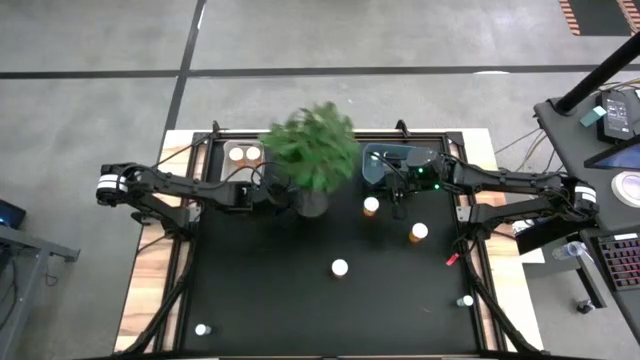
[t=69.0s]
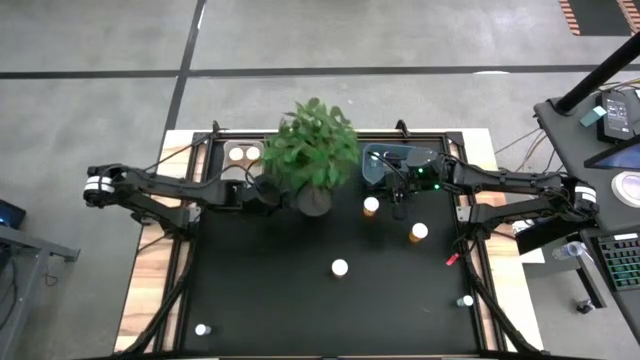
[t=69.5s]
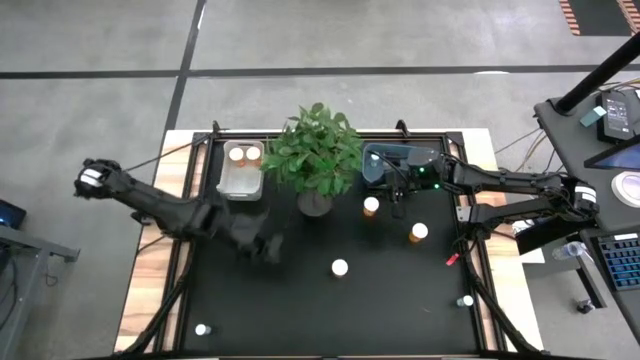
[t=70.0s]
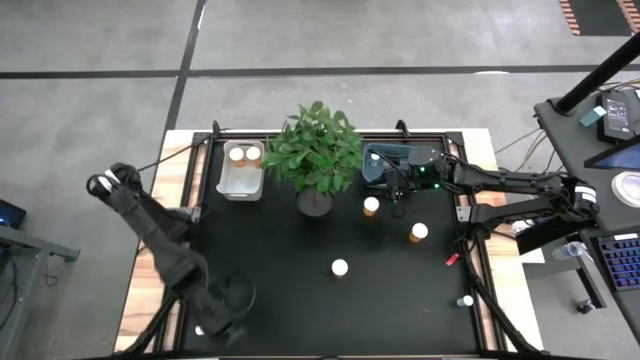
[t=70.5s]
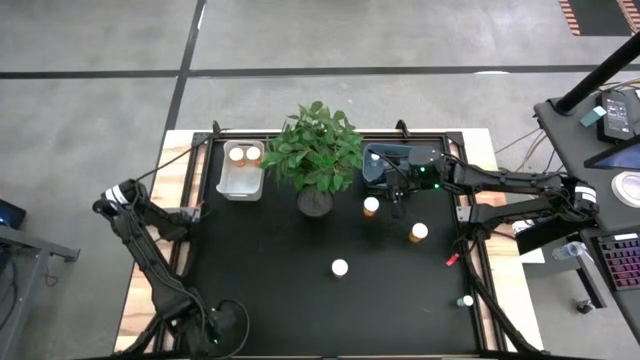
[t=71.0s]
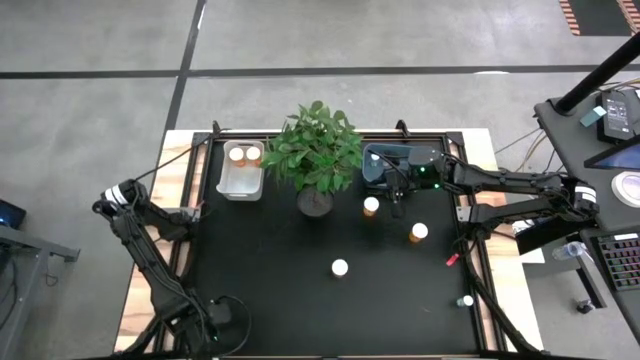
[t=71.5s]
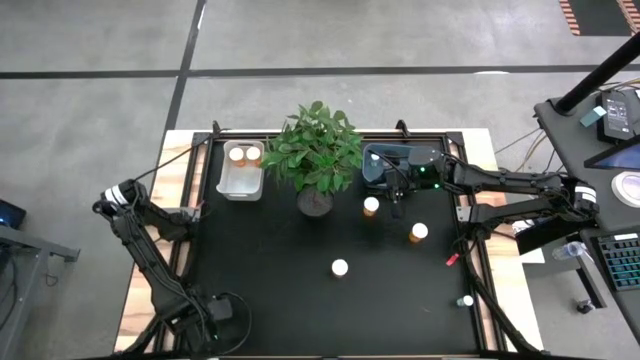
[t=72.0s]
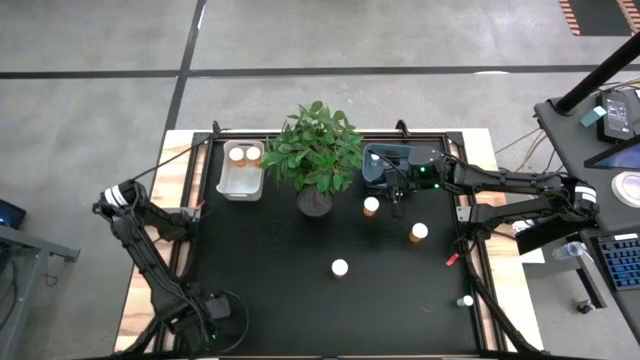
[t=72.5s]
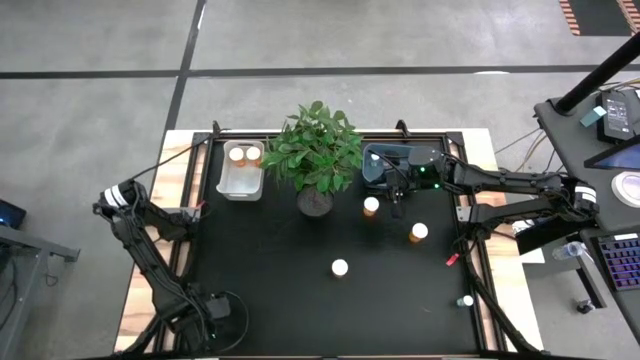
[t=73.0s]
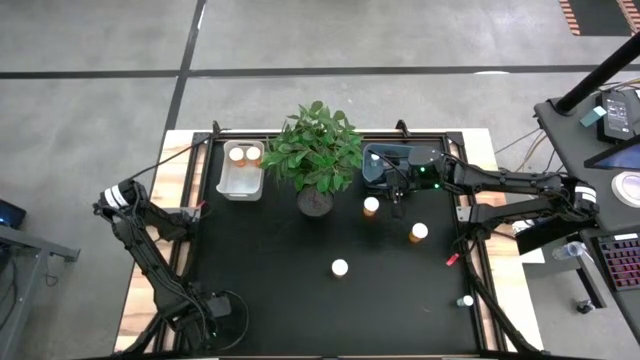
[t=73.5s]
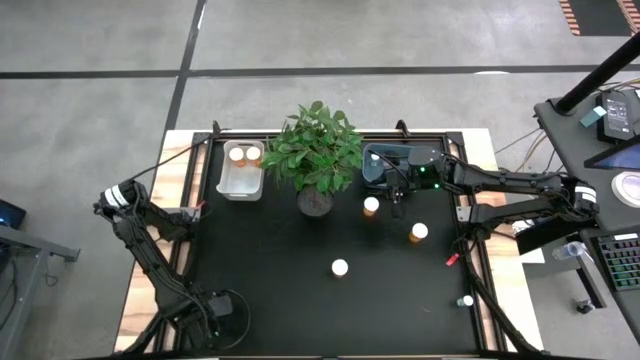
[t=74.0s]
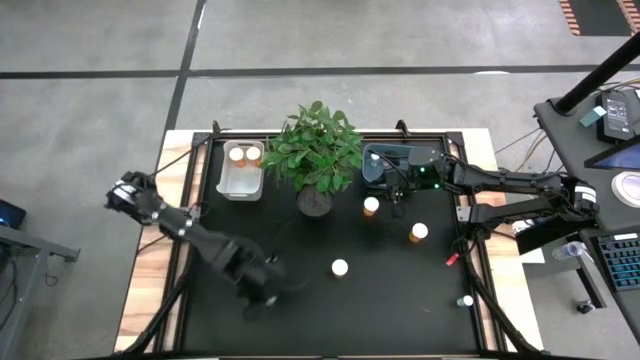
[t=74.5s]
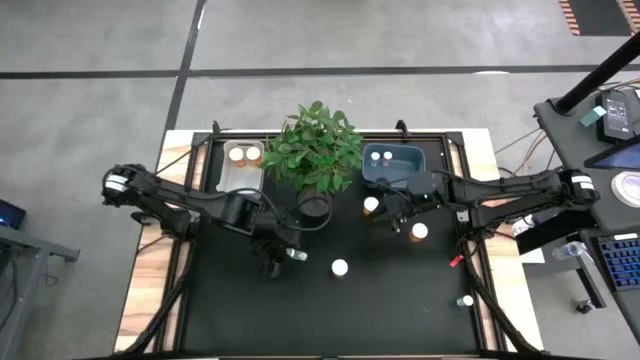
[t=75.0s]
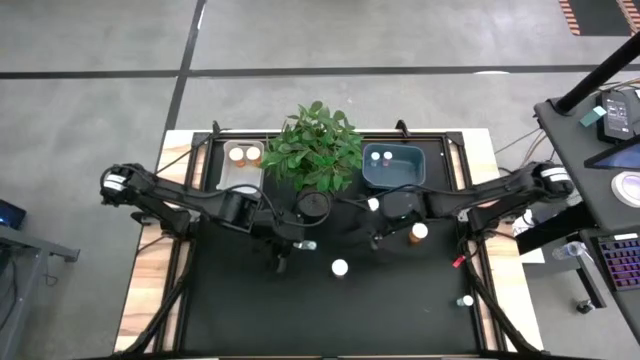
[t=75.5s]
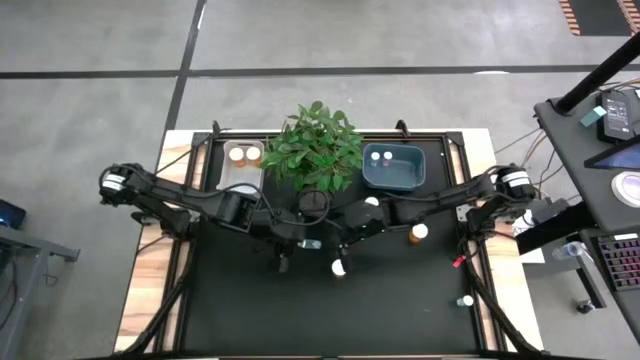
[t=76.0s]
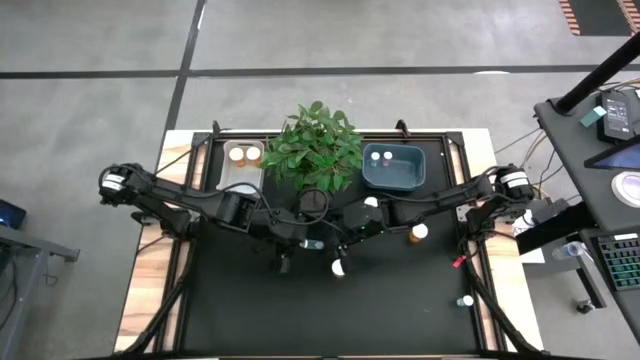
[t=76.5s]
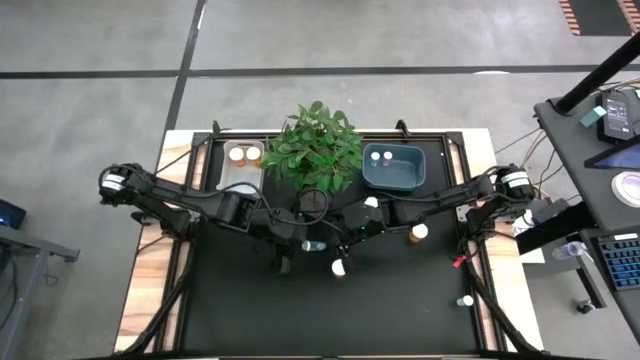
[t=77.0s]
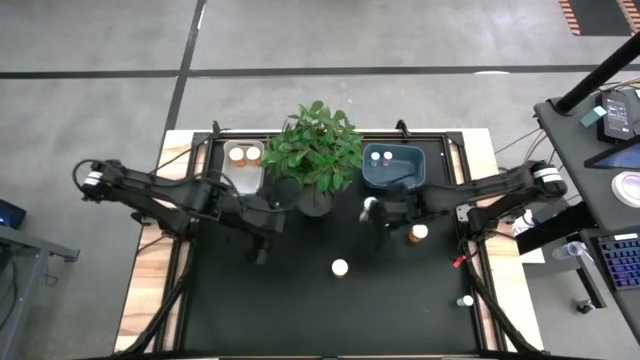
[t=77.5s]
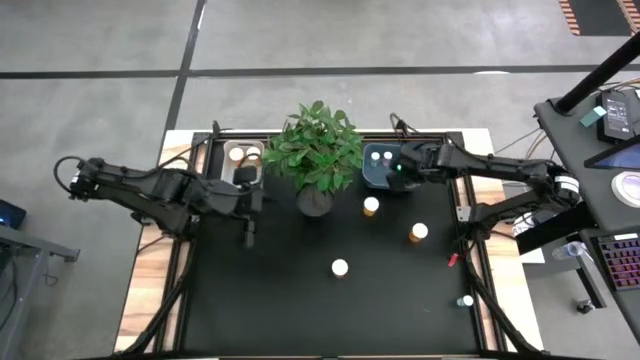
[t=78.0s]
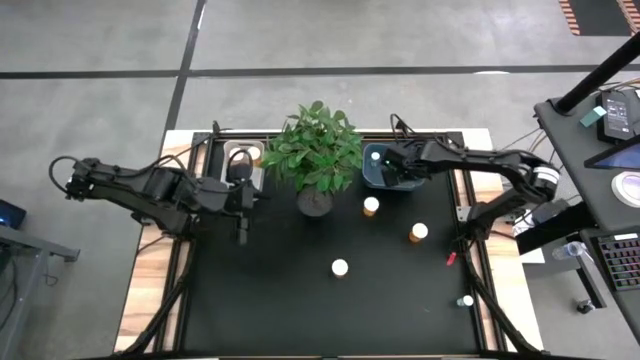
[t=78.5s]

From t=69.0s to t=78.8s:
Task: Pick and place medicine bottles into bin by pill shape (circle, oval)
Put the small blue pill bottle into the blue bin

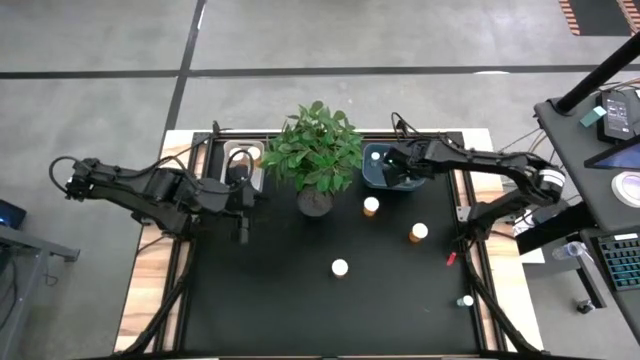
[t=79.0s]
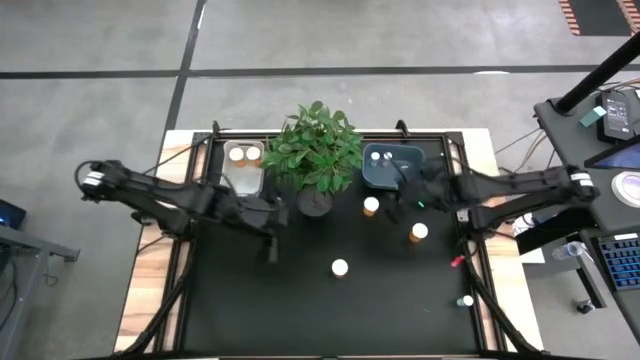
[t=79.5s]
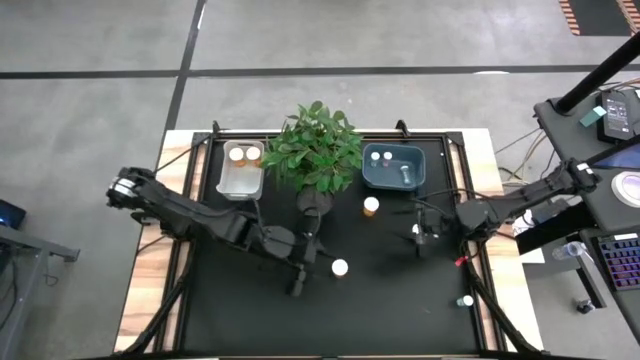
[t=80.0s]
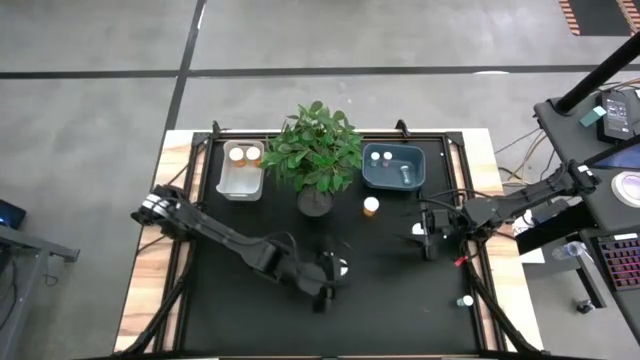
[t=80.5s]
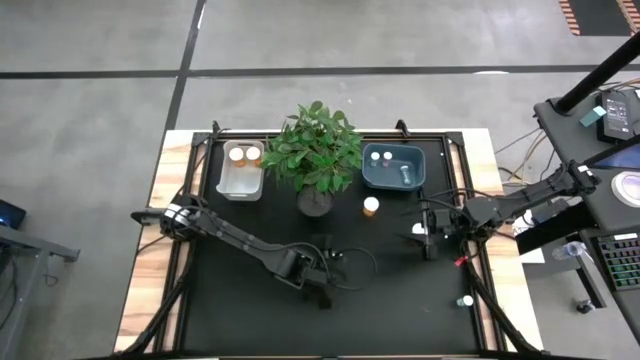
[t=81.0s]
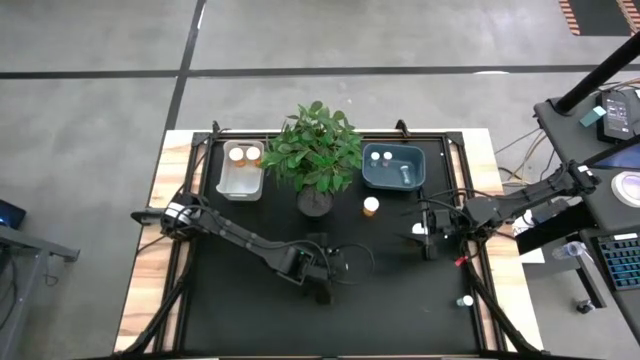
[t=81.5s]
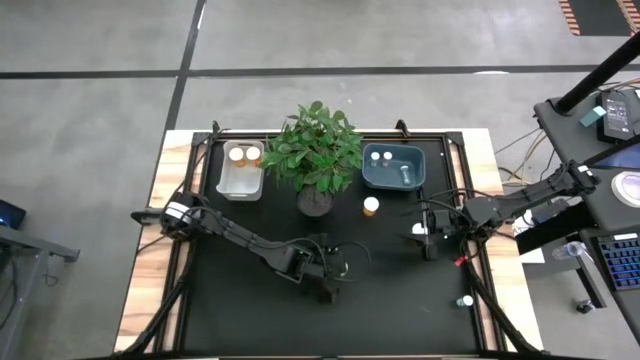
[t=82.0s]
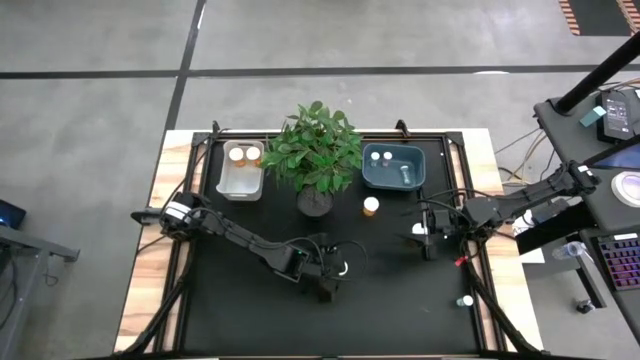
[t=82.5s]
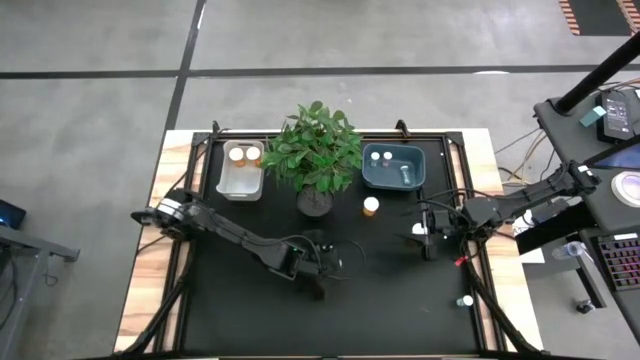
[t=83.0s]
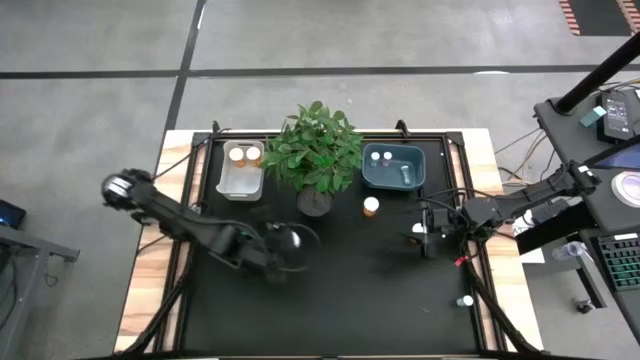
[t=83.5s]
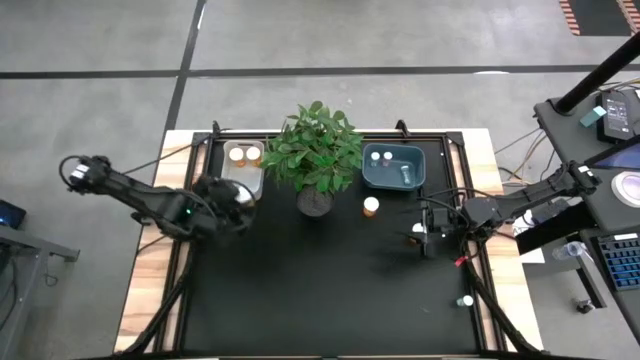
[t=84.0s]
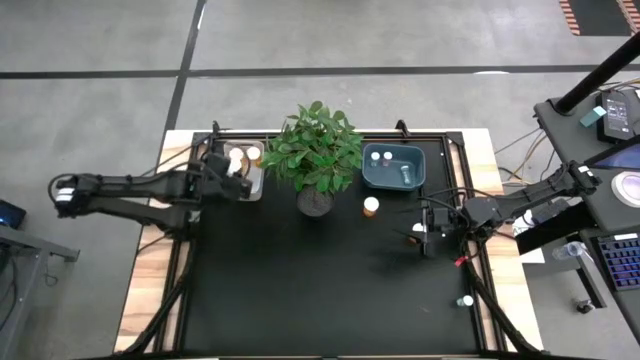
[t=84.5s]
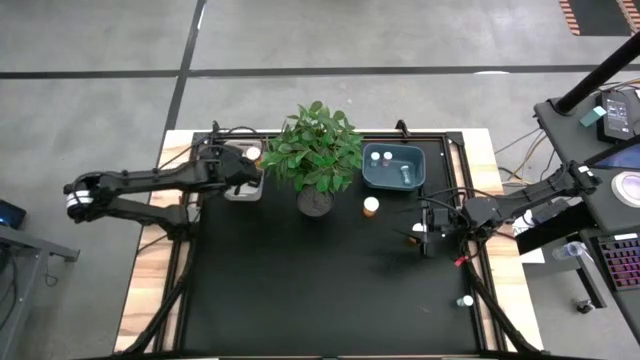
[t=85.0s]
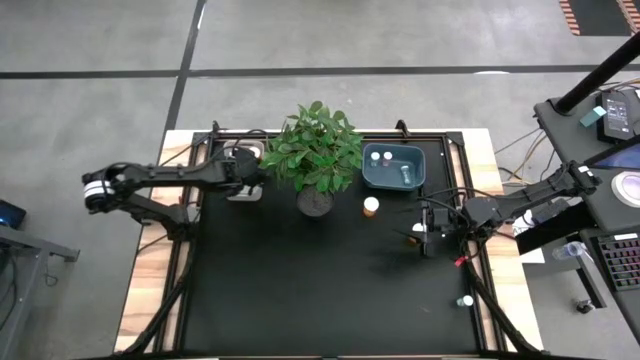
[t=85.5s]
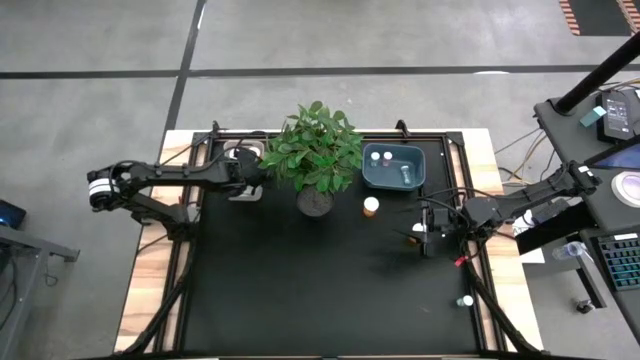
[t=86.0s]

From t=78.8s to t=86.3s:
Put the big orange pill bottle into the white bin

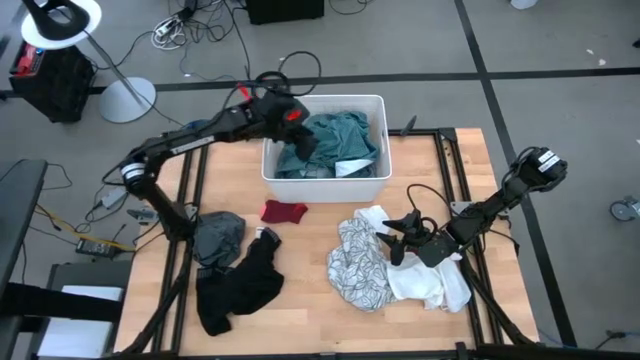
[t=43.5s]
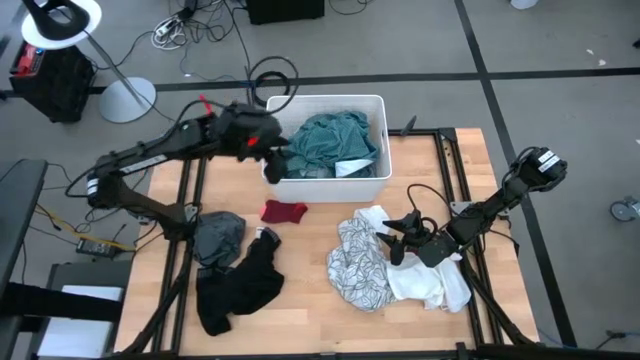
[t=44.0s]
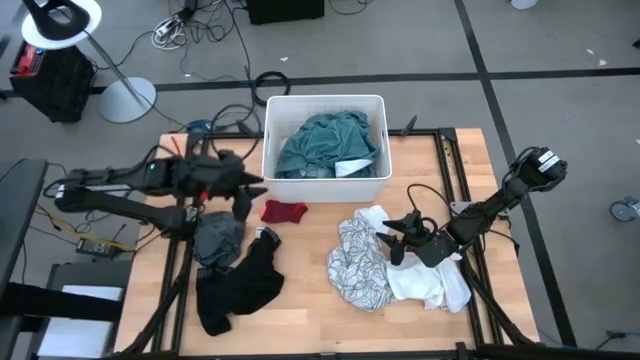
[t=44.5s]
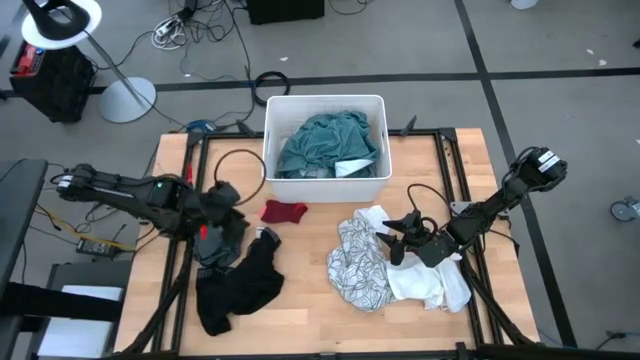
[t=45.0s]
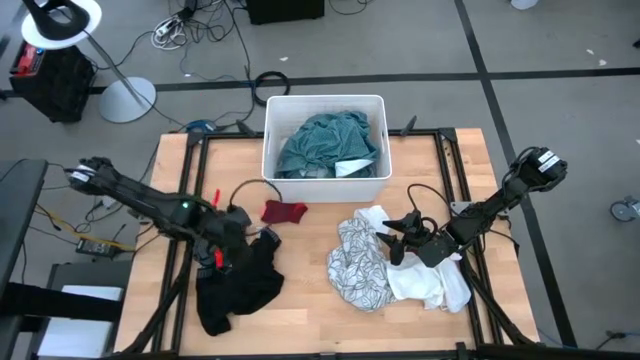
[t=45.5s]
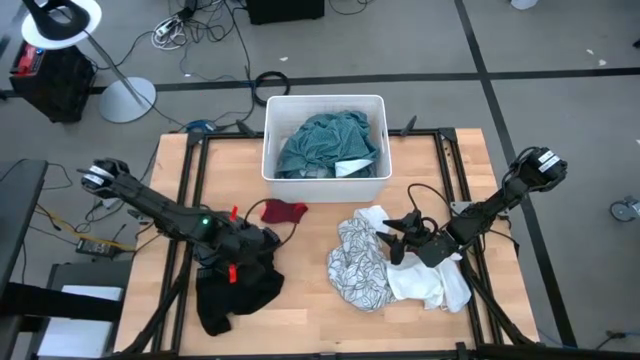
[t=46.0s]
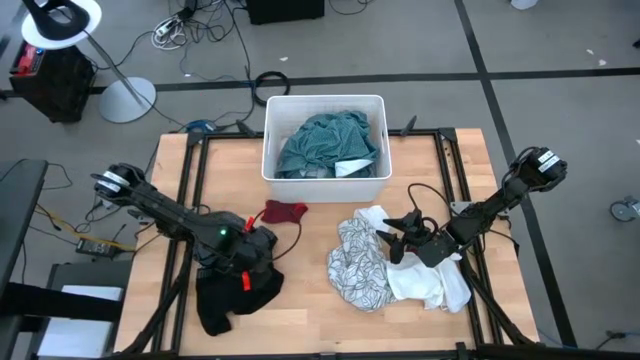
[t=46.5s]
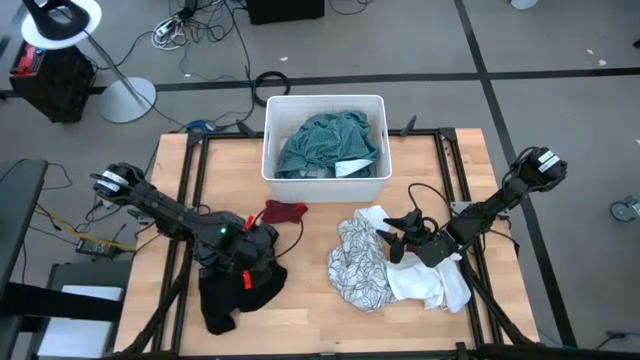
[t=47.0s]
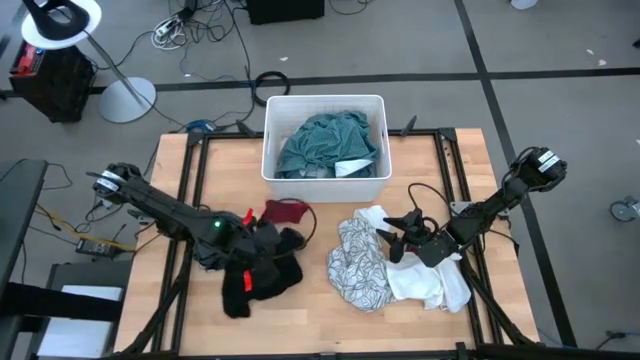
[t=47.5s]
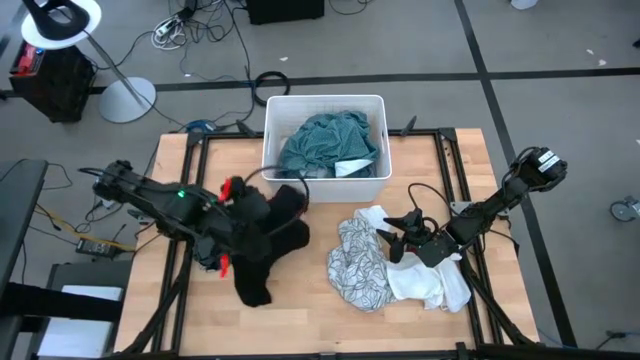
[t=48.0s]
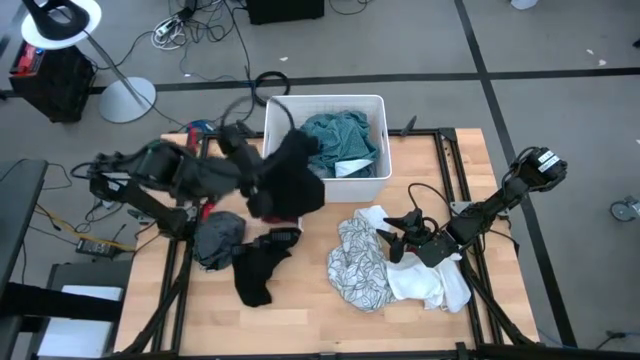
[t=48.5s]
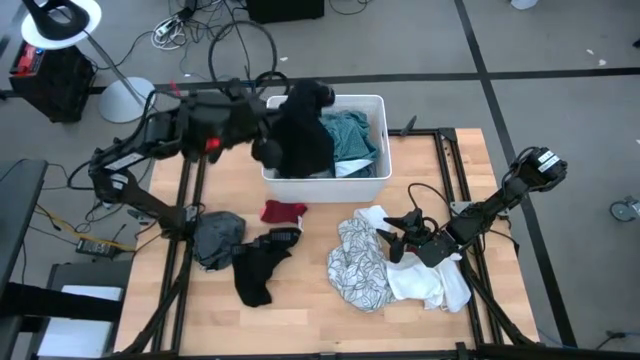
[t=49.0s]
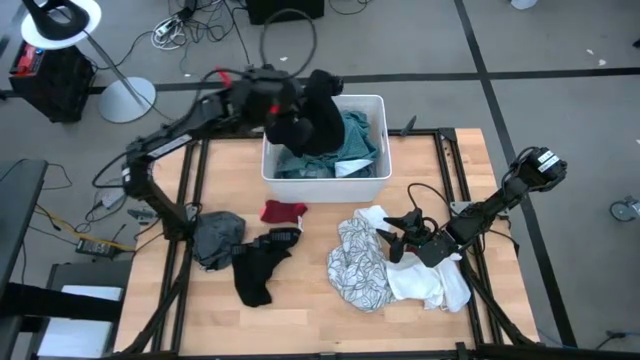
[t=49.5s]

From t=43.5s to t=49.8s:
Task: Sort clothes
Put the right black boxer into the white laundry bin
